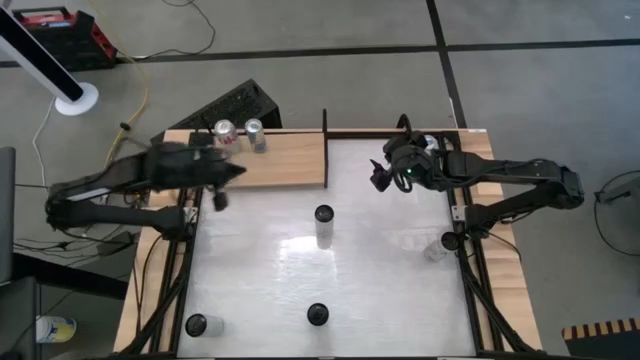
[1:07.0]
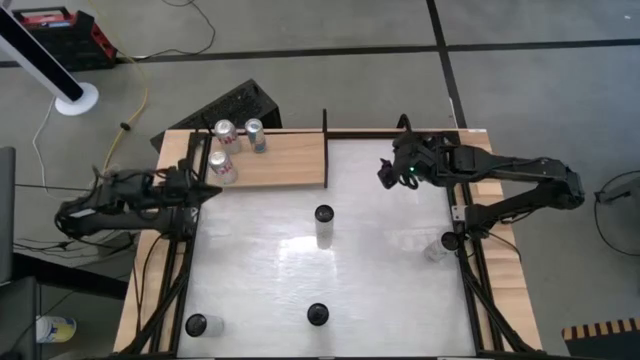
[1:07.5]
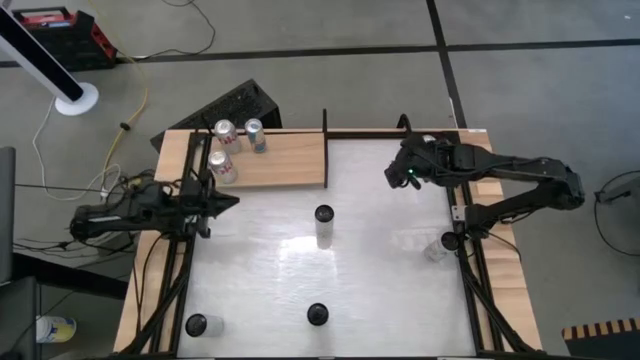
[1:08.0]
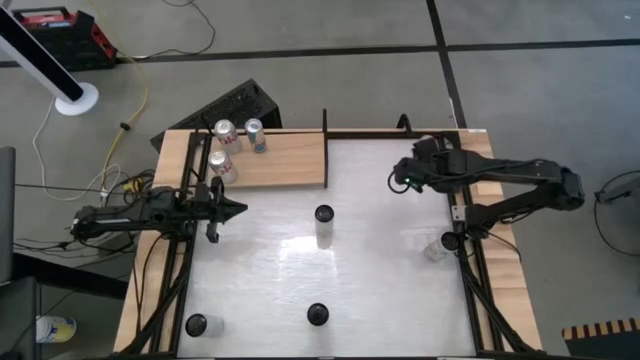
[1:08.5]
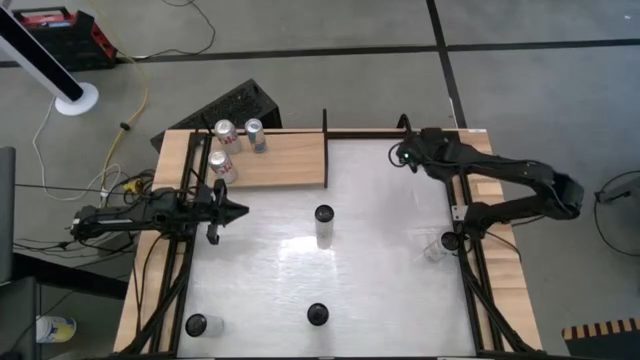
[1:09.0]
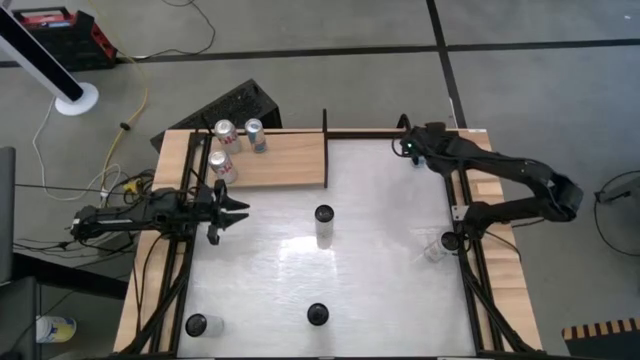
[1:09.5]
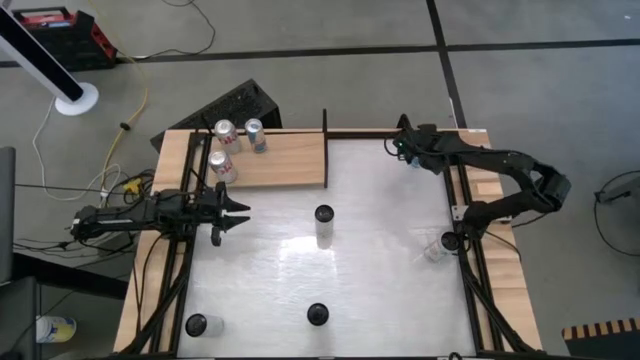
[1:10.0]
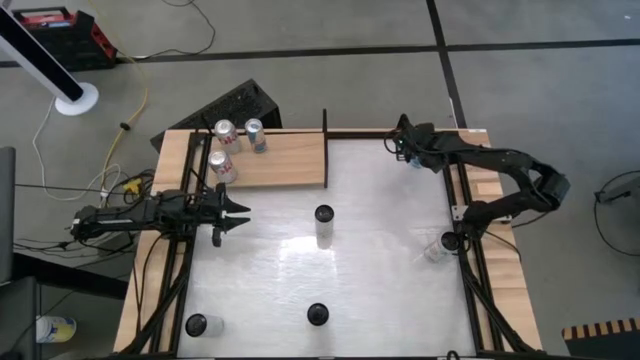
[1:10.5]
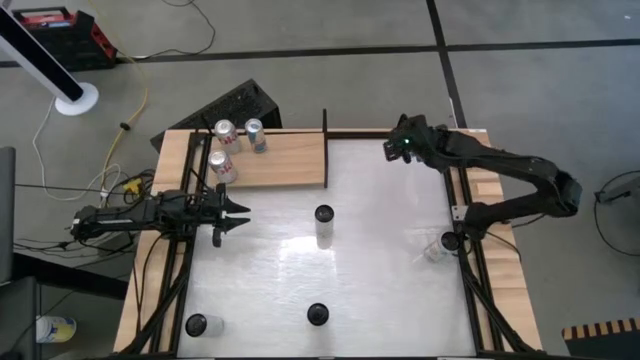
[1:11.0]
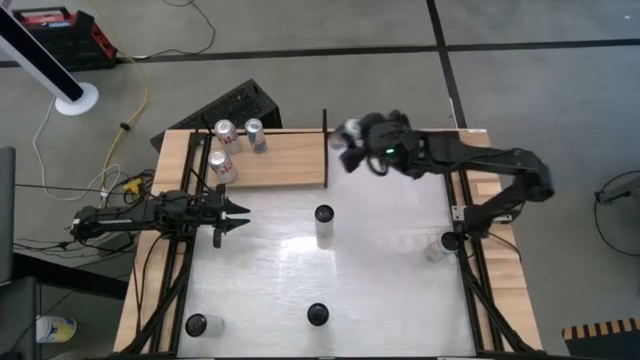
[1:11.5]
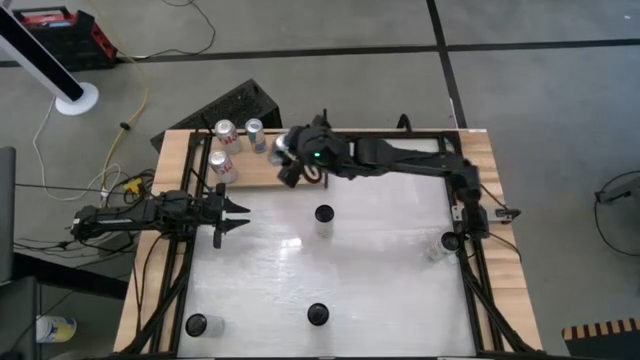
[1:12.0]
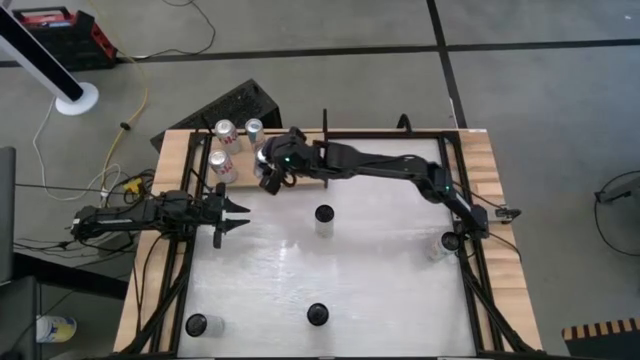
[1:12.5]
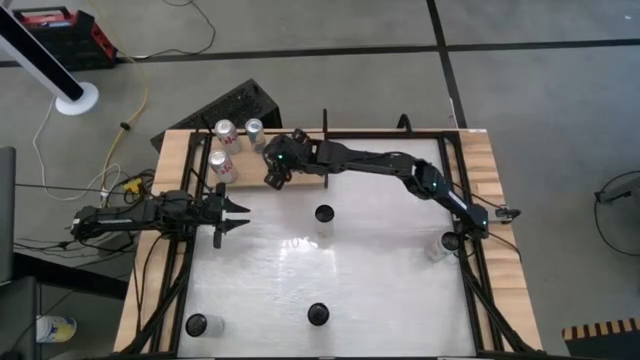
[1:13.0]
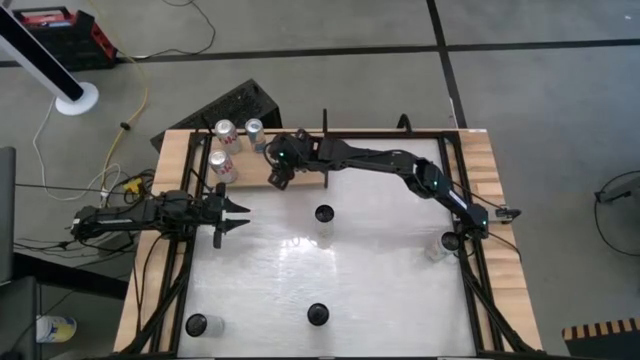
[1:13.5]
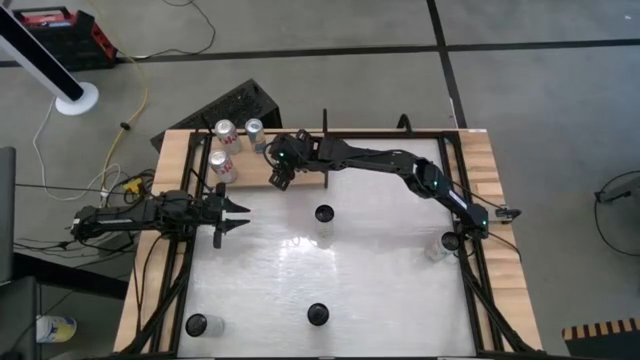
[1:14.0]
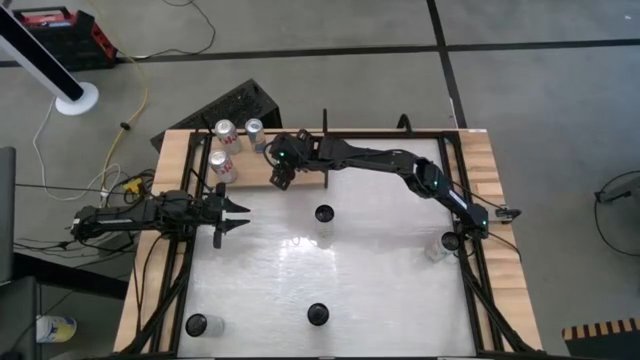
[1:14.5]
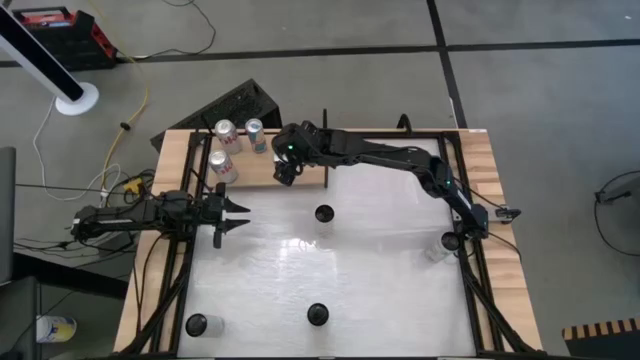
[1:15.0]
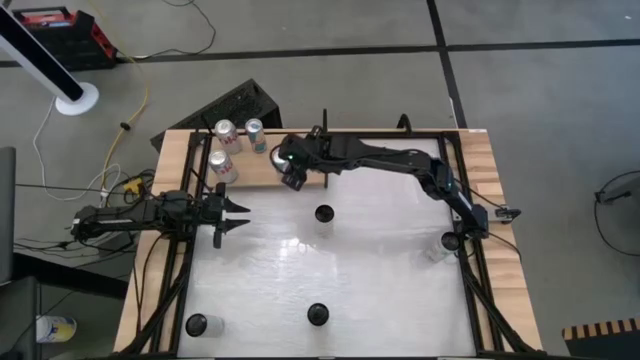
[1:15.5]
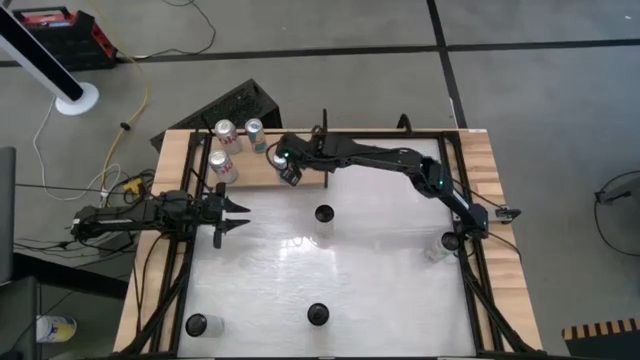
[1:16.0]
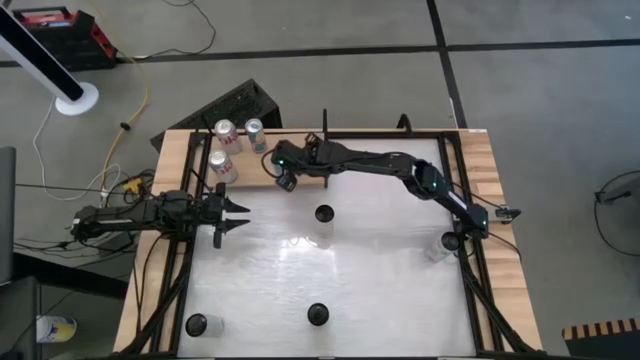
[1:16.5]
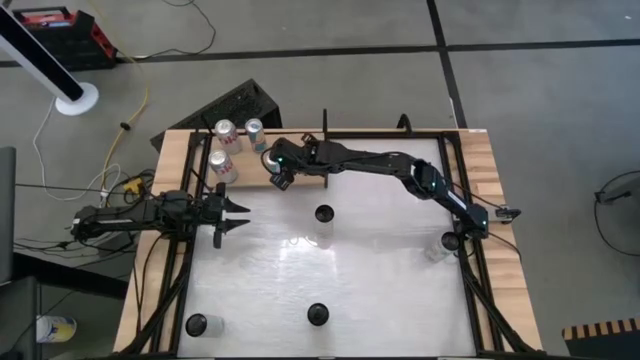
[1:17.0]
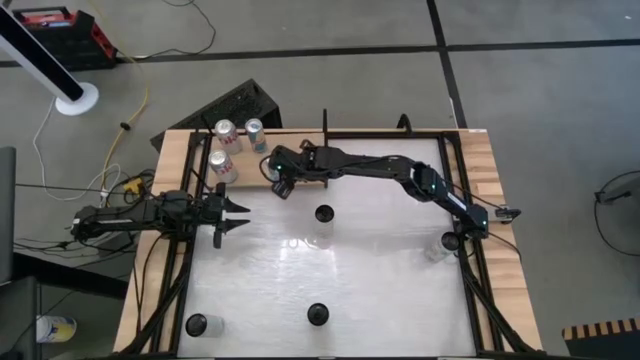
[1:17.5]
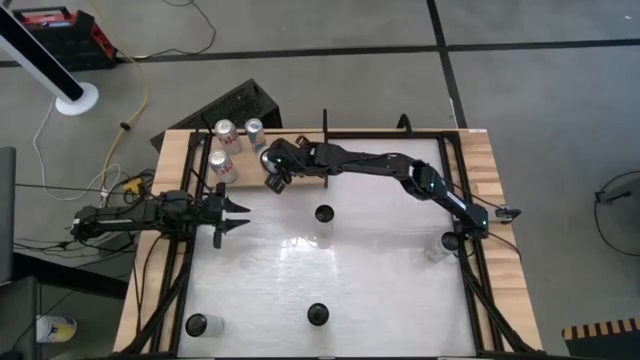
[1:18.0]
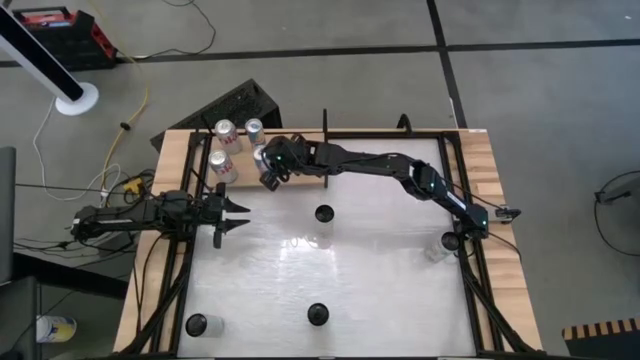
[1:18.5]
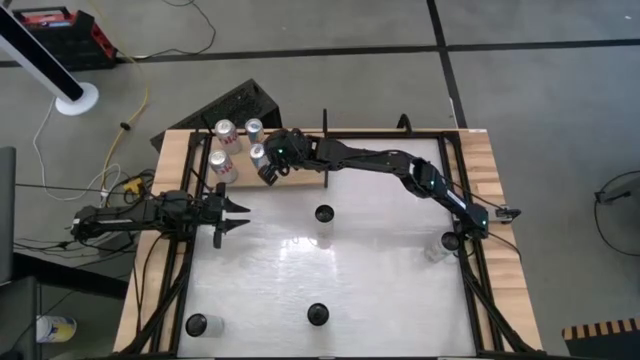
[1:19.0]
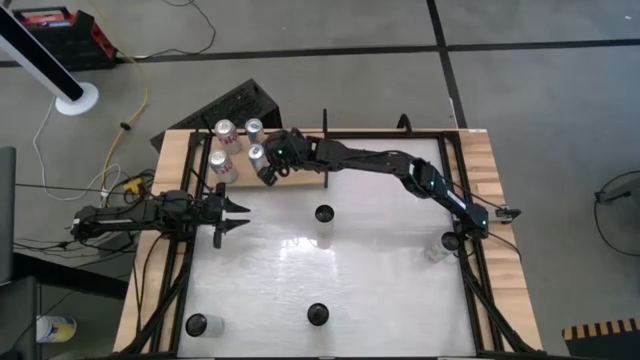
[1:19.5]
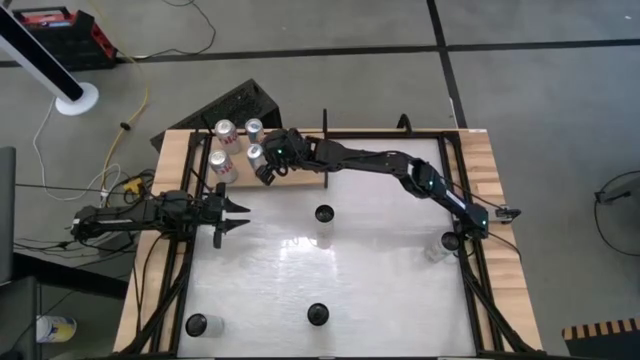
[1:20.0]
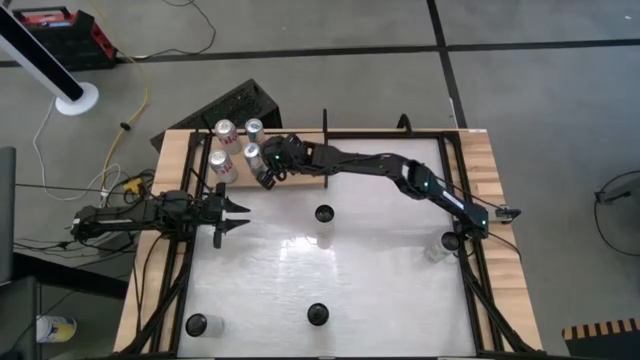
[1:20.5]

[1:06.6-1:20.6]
Task: Place canned beverage on shelf
Put the blue soda can aligned with the other blue soda can on the shelf

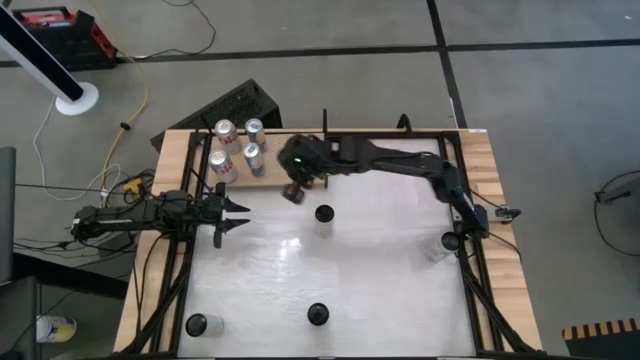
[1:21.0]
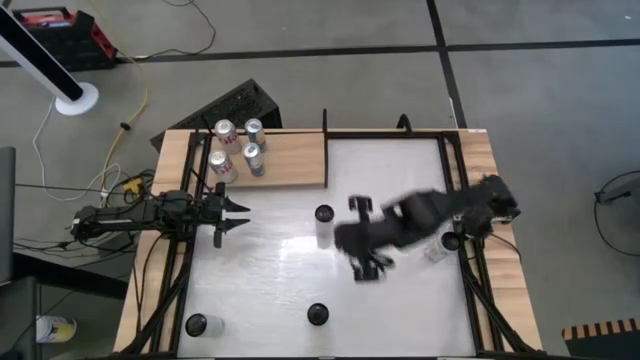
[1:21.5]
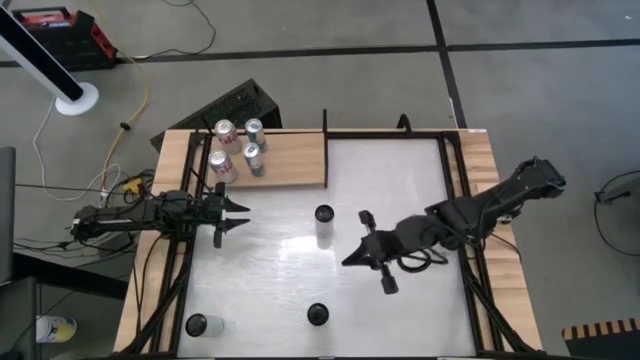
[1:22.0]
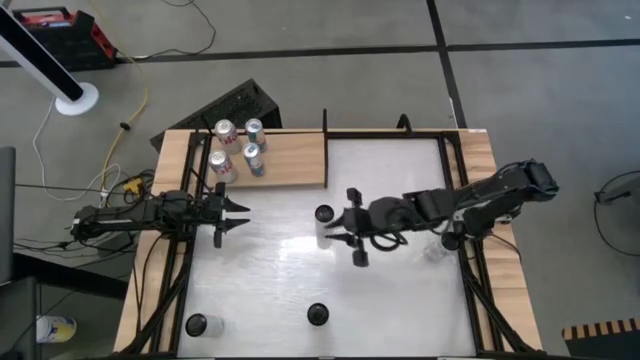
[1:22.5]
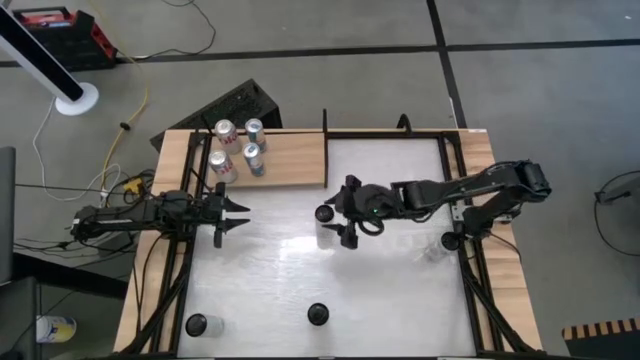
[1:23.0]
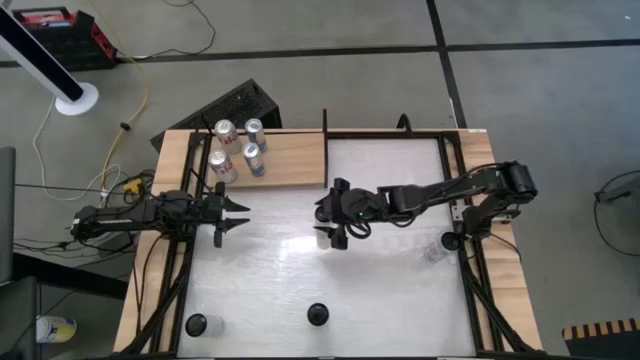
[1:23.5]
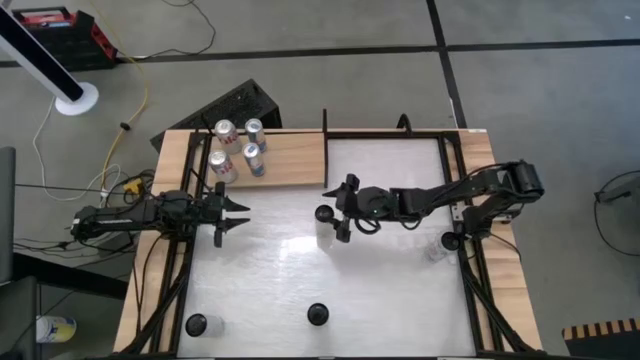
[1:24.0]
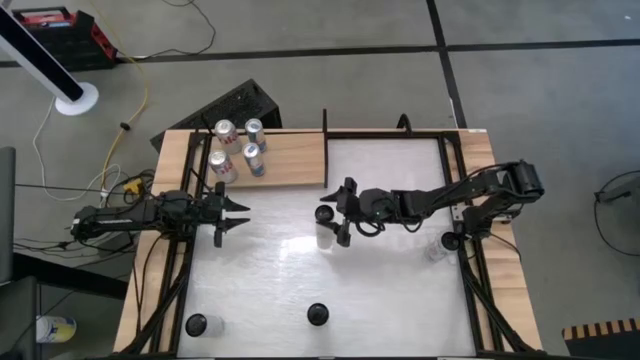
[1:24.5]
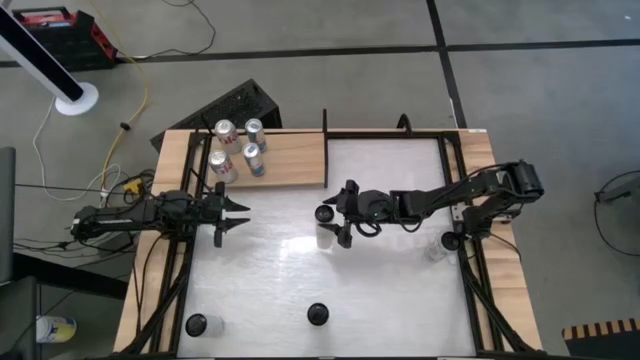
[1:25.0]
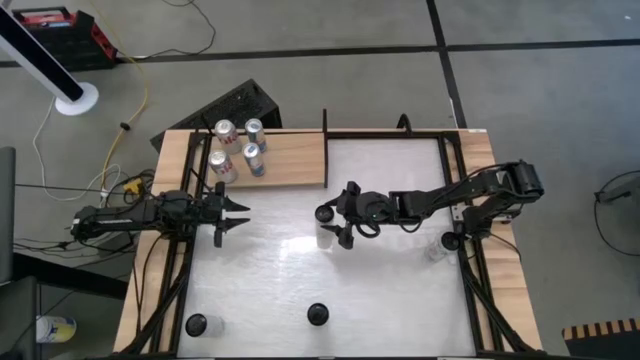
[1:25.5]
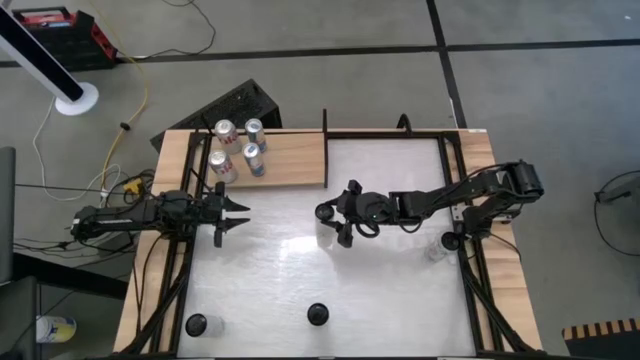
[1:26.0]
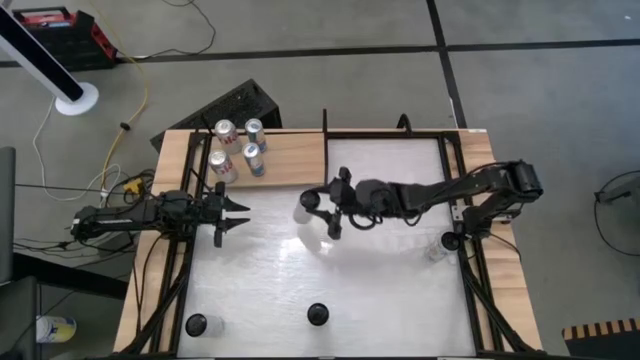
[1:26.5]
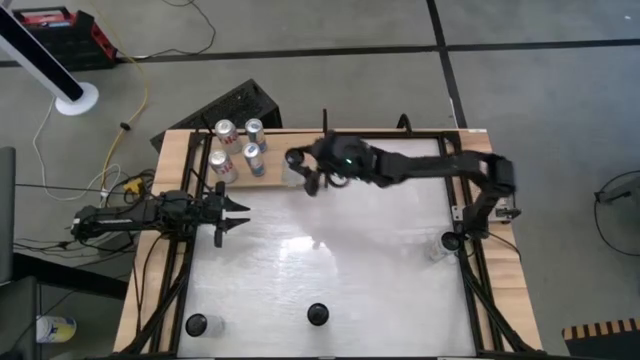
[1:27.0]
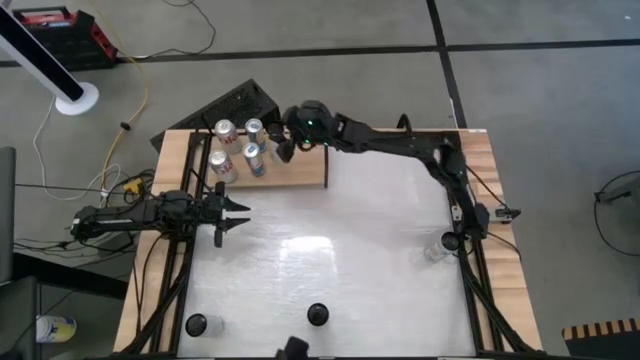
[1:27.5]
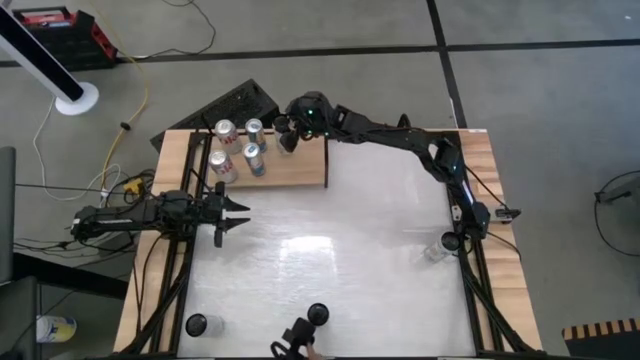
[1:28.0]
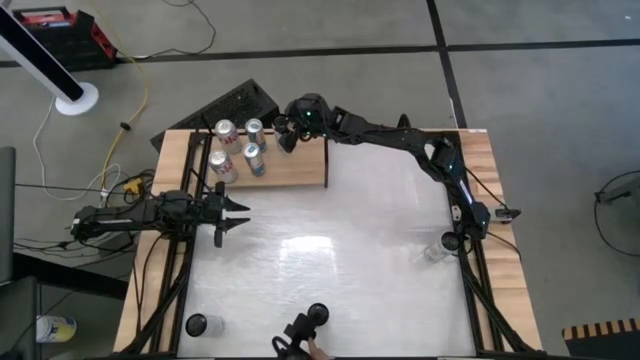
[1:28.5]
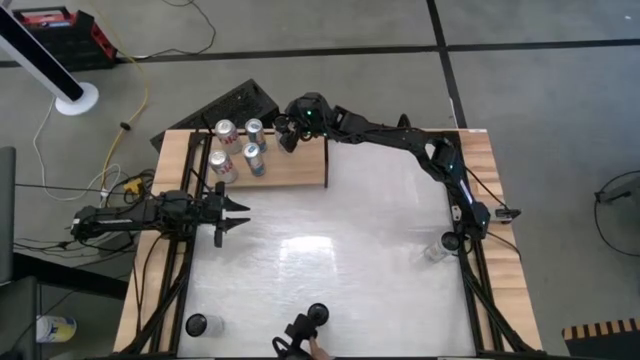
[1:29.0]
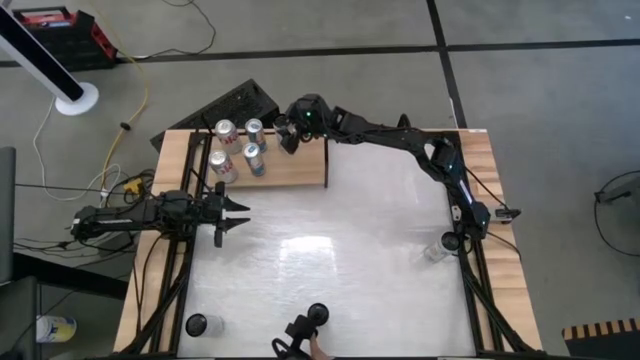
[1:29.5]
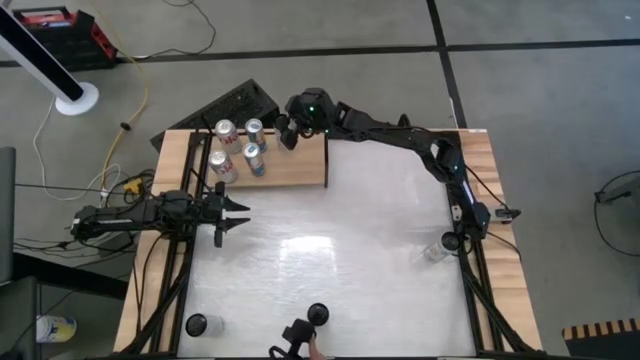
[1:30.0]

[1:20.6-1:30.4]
Put the top white and yellow soda can on the shelf
